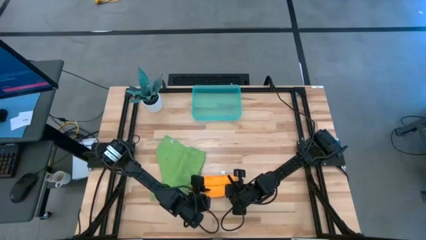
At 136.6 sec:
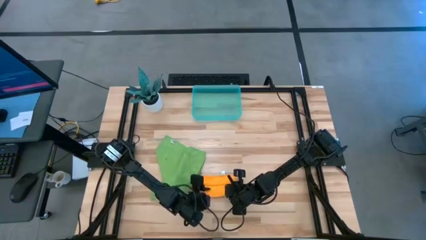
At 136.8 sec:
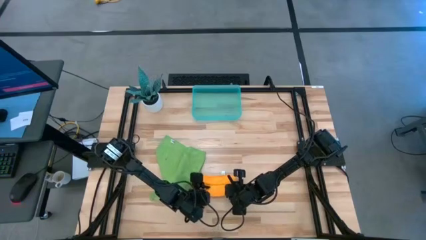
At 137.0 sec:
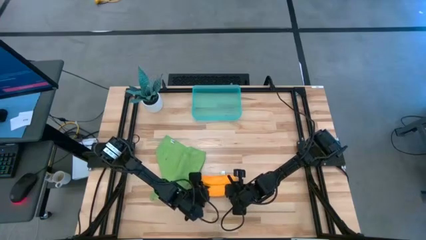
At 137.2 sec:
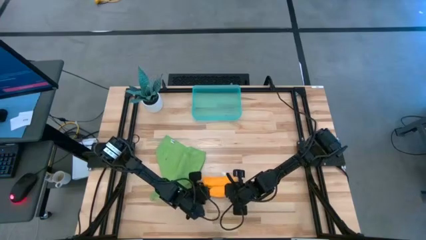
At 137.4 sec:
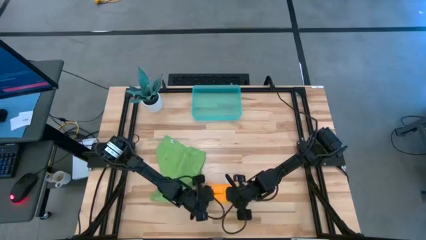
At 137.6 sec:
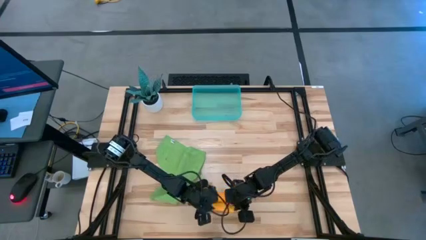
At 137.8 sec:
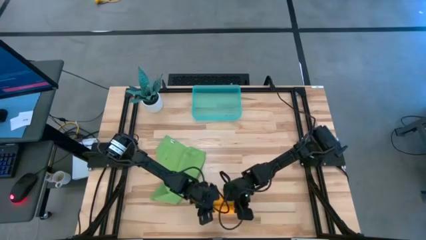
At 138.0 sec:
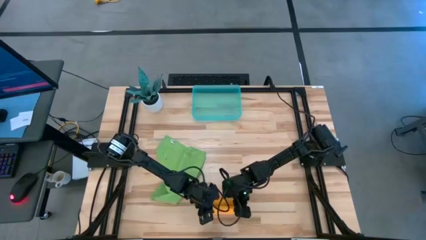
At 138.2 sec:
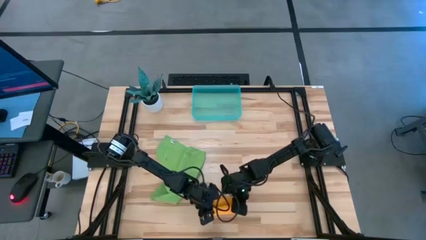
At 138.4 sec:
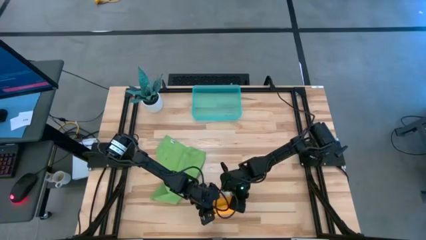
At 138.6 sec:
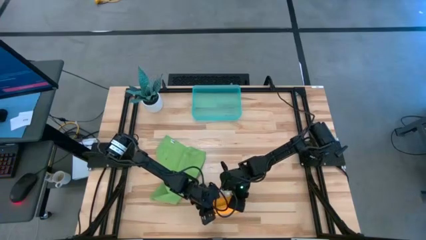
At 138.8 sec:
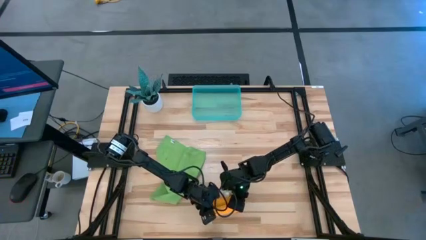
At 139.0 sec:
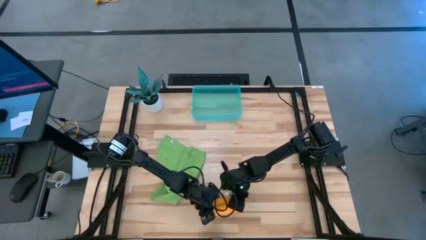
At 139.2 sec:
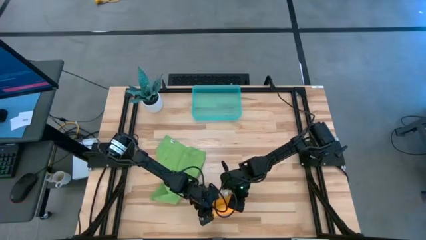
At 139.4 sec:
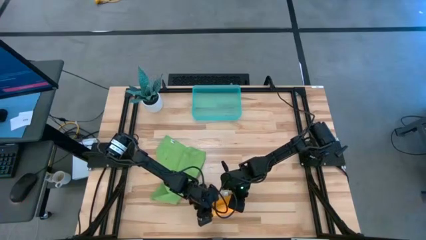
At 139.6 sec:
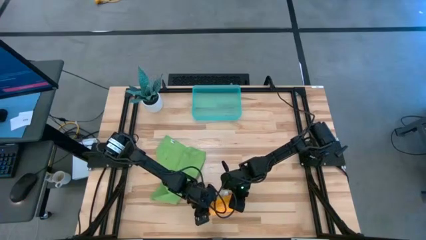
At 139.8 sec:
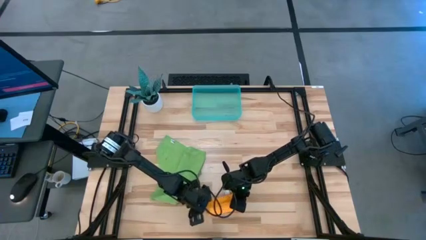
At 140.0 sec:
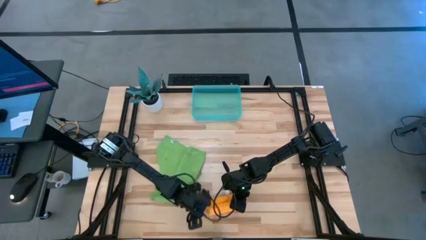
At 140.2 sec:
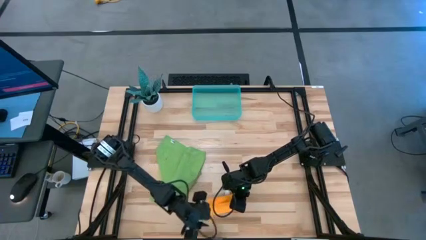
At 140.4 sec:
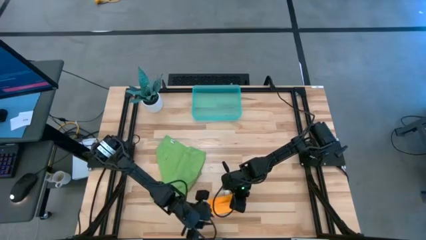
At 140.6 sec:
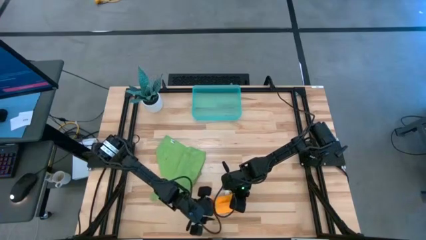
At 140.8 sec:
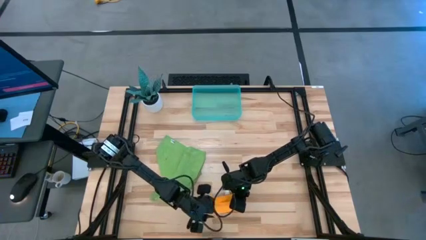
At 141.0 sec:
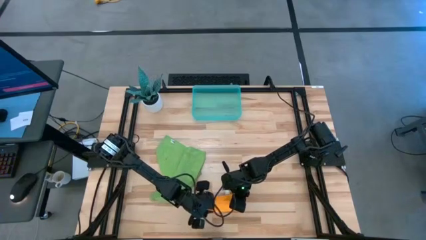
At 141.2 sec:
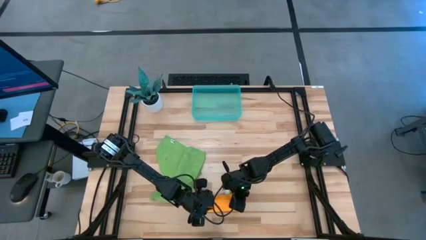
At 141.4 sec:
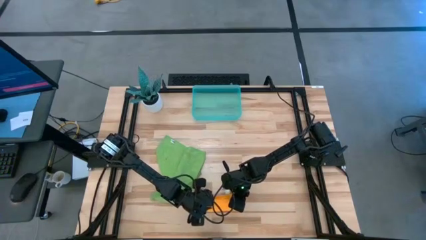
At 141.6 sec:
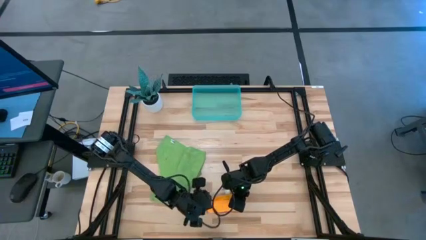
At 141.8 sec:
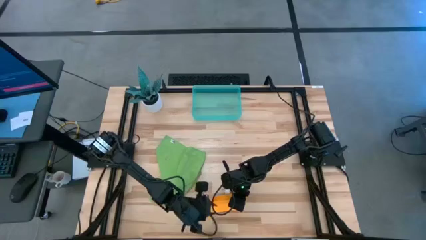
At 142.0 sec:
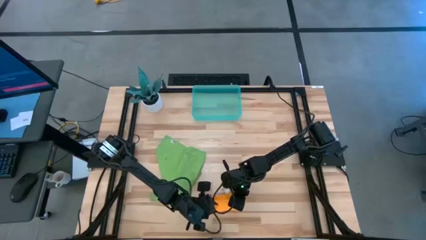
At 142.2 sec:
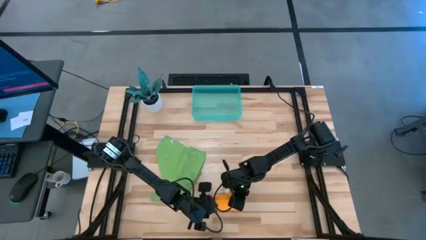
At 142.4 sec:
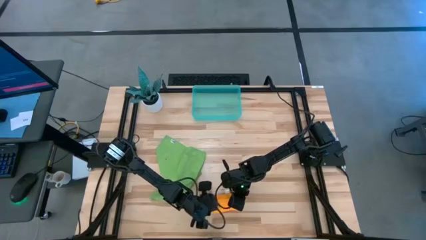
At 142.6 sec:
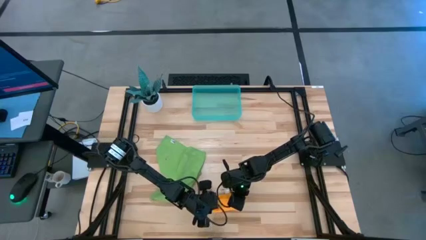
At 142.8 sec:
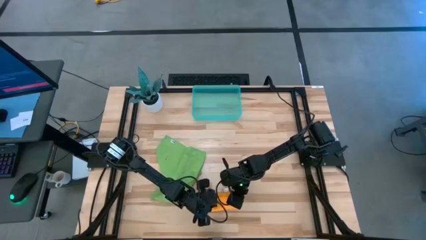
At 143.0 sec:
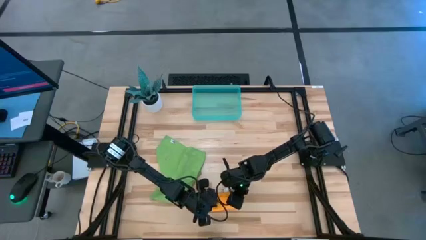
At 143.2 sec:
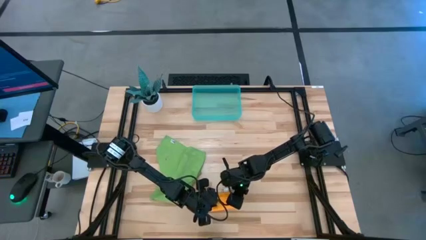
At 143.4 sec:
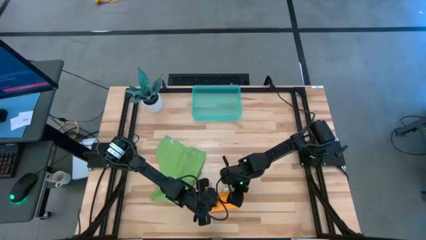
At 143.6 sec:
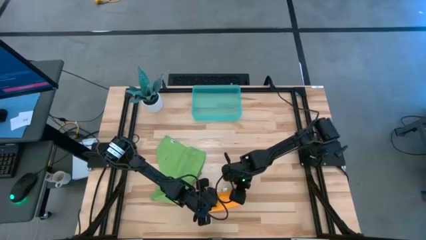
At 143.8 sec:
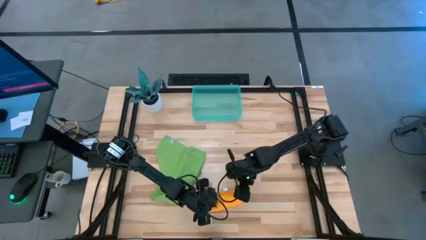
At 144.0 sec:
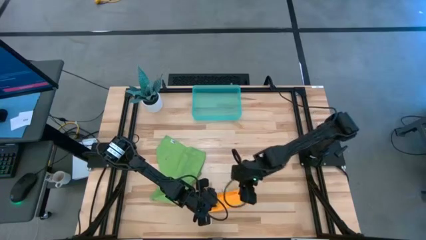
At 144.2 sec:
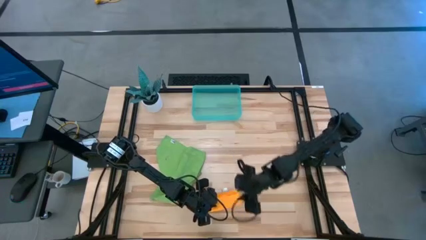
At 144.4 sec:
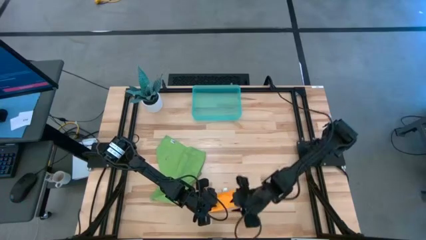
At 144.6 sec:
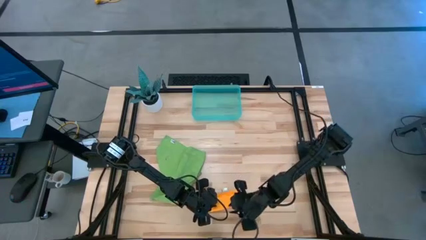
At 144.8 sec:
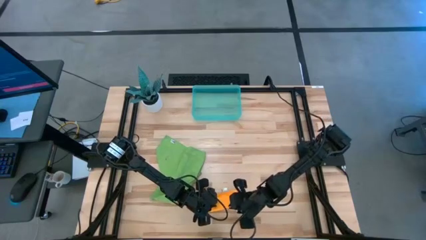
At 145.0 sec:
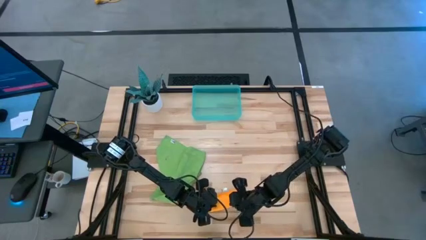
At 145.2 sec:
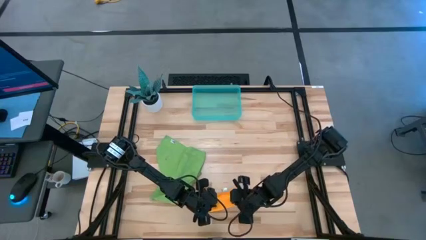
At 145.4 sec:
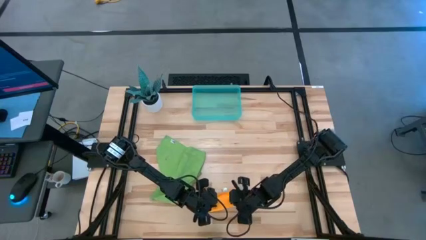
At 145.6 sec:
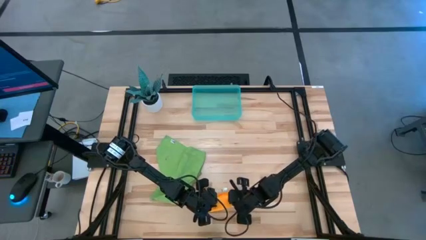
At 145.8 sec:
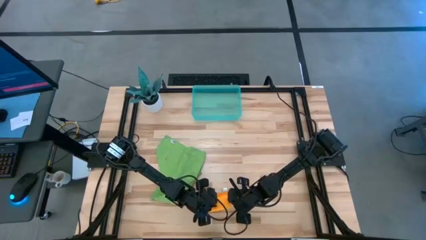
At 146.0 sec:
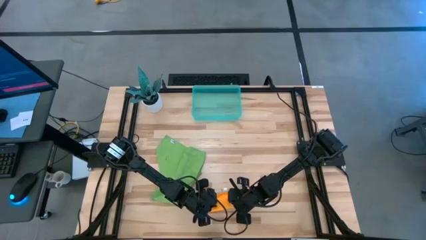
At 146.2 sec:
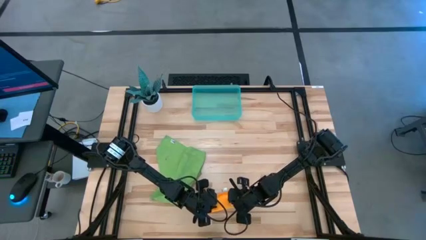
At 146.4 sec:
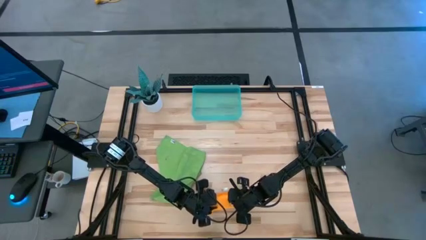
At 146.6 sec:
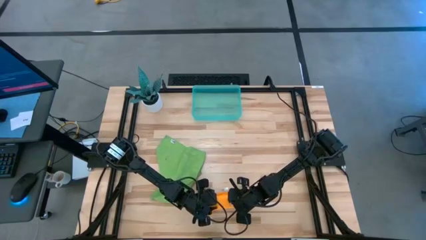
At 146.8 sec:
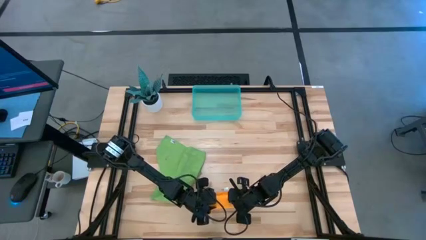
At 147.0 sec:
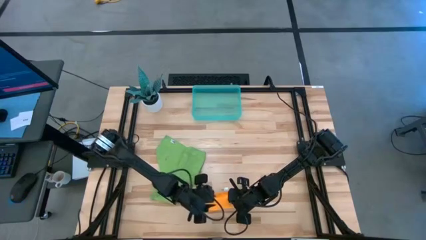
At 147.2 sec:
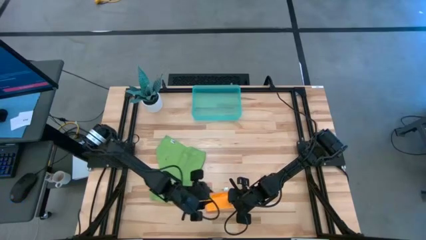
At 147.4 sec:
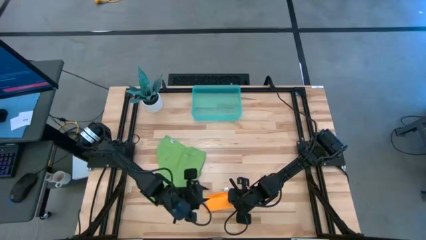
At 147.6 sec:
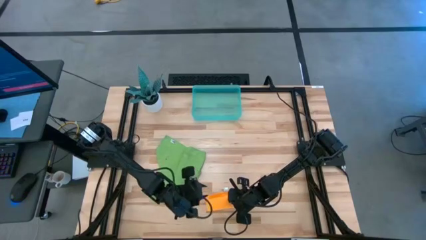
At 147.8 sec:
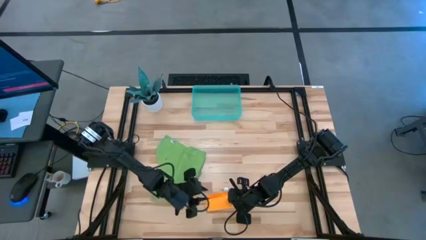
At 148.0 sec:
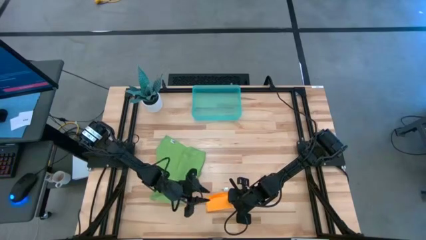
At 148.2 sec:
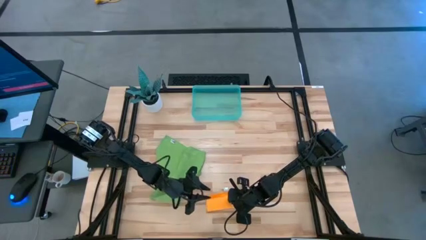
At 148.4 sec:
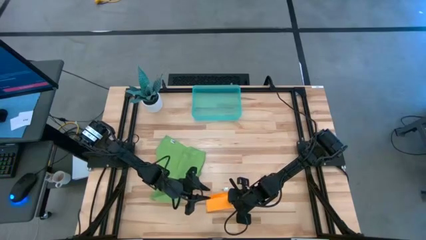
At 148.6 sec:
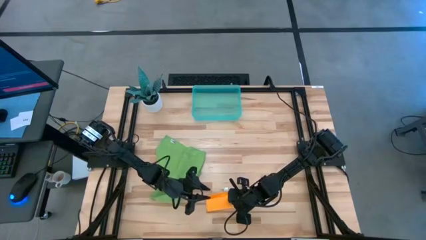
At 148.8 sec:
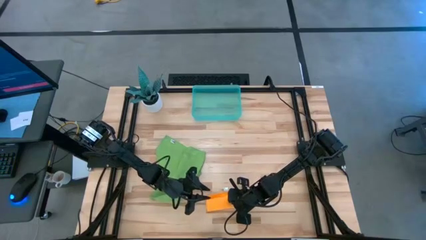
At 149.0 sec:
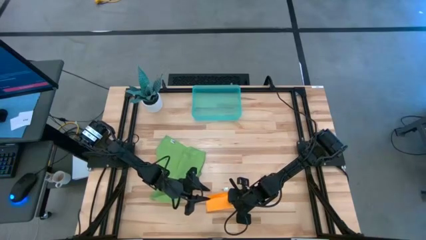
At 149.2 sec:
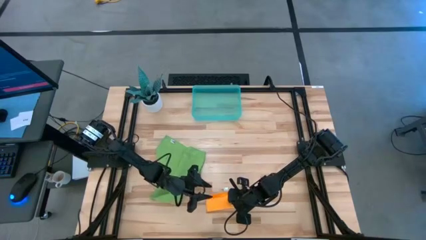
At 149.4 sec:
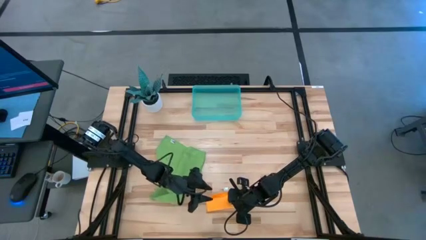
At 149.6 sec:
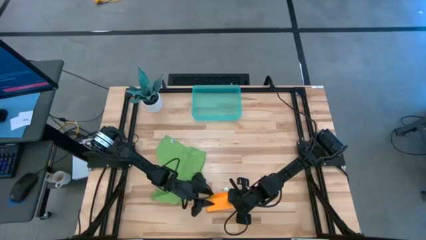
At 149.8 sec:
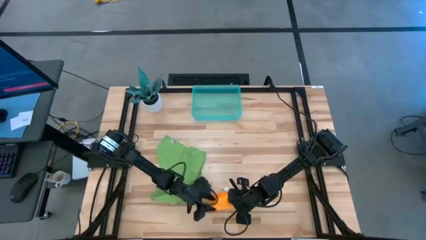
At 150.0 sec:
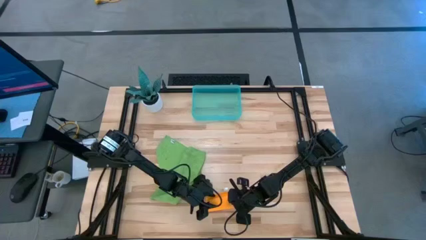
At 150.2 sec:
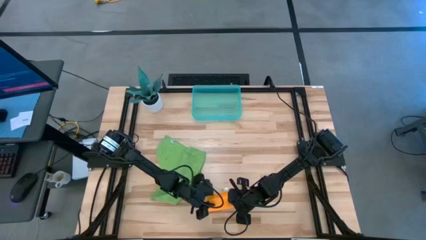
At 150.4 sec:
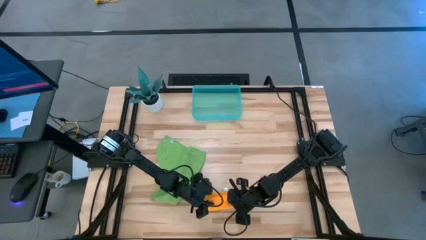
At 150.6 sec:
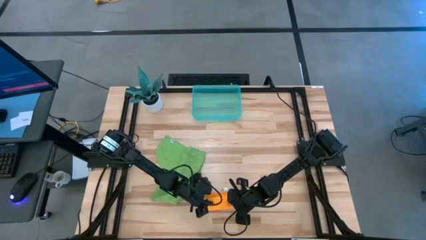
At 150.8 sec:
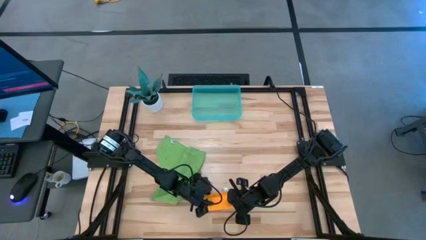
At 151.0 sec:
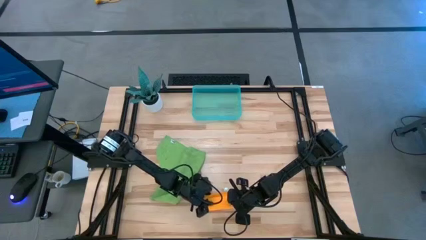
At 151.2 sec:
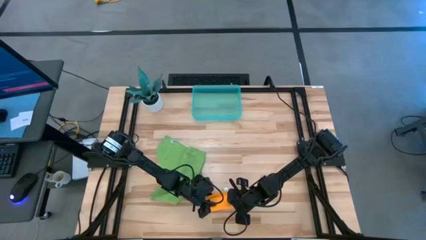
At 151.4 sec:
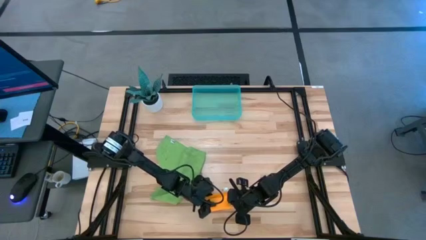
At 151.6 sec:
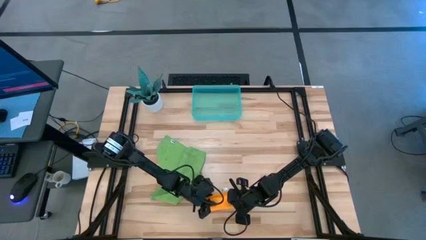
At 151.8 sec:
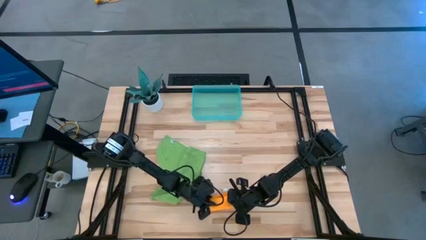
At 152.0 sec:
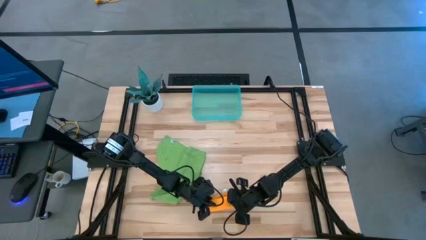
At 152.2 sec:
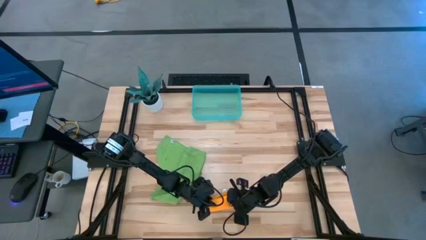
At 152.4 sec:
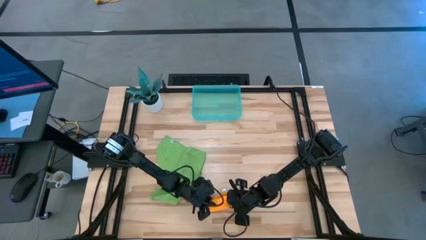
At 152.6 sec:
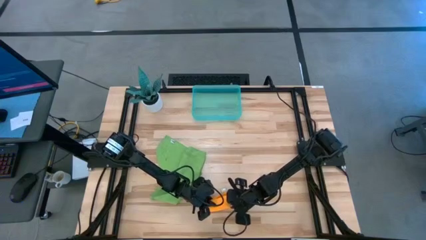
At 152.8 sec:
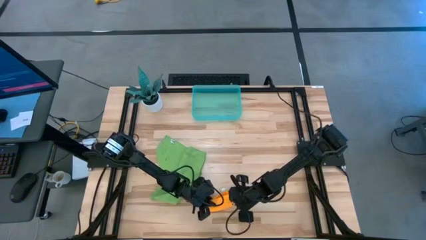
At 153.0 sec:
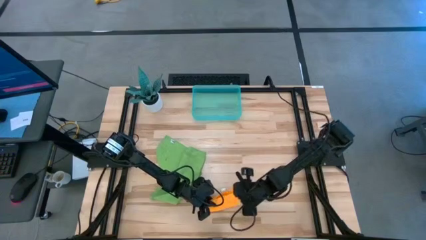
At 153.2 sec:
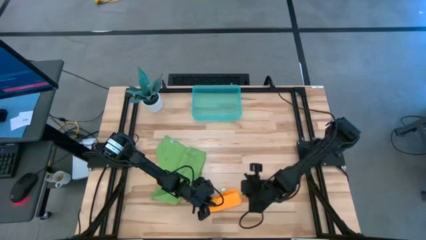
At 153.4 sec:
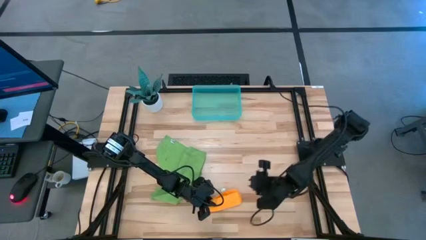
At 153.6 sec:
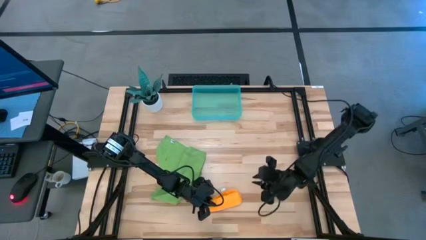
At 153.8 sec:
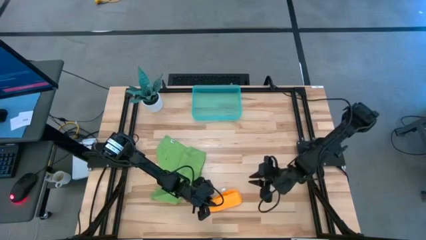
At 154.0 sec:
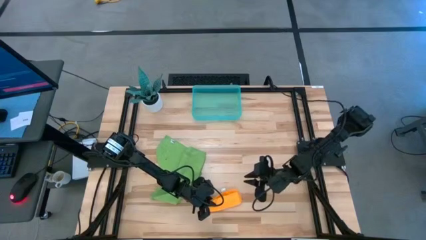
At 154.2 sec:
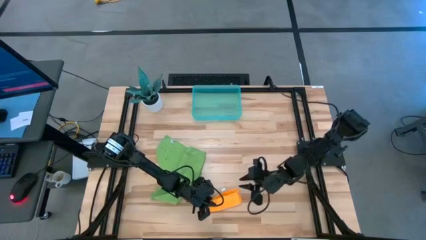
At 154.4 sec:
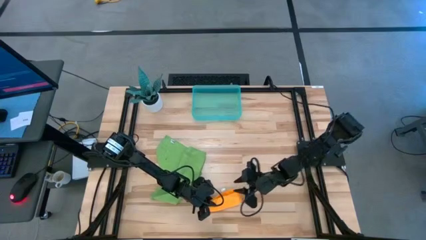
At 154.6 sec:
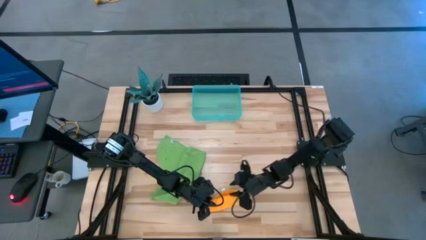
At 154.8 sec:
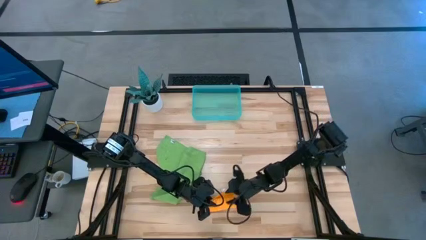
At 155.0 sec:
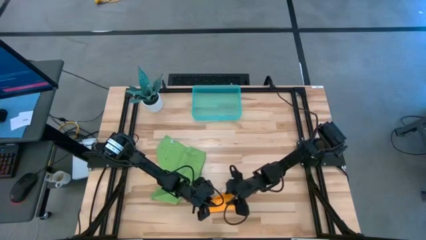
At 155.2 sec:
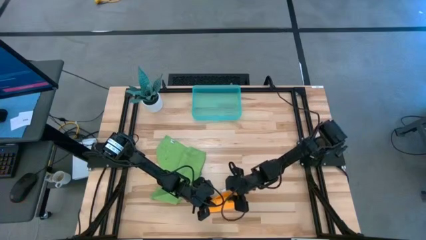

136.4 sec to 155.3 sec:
Task: Roll microfiber towels into tight, uniform cylinder then place into a basket
Roll the orange microfiber cloth
